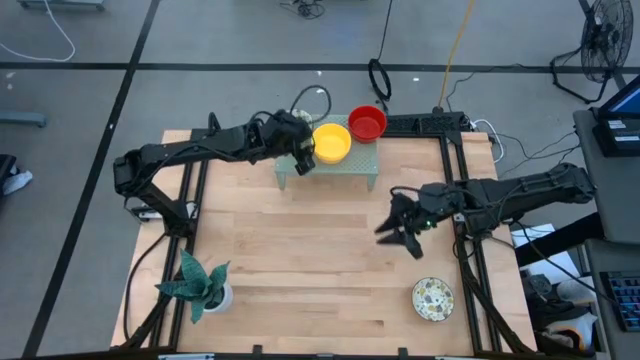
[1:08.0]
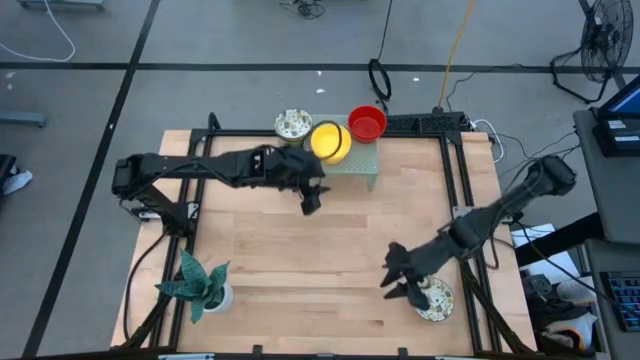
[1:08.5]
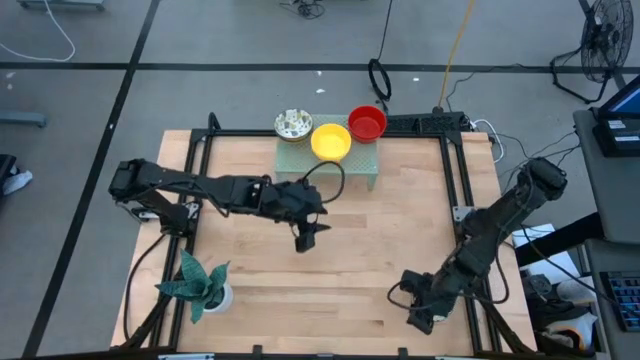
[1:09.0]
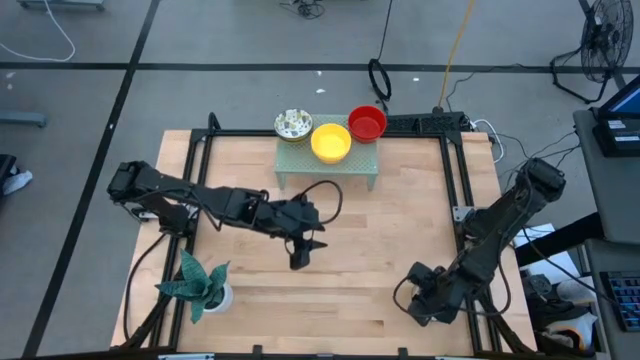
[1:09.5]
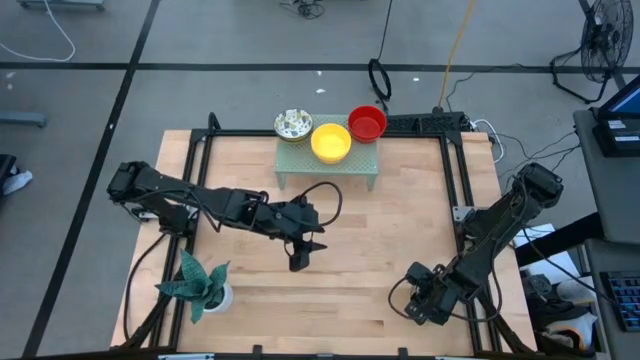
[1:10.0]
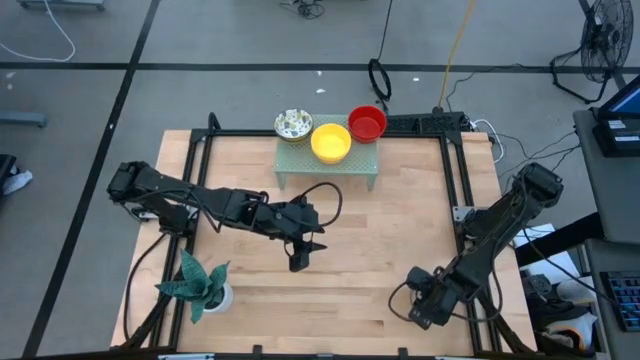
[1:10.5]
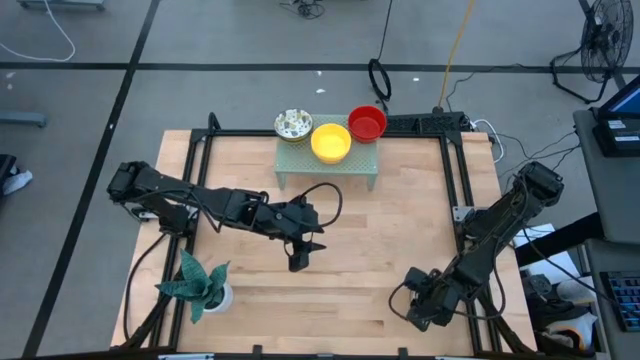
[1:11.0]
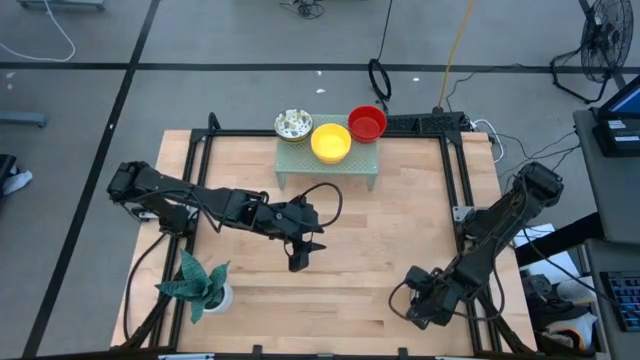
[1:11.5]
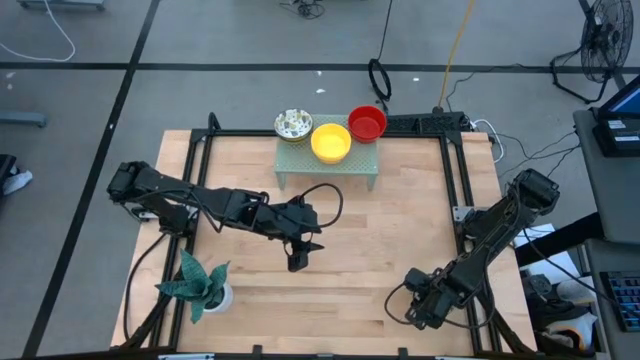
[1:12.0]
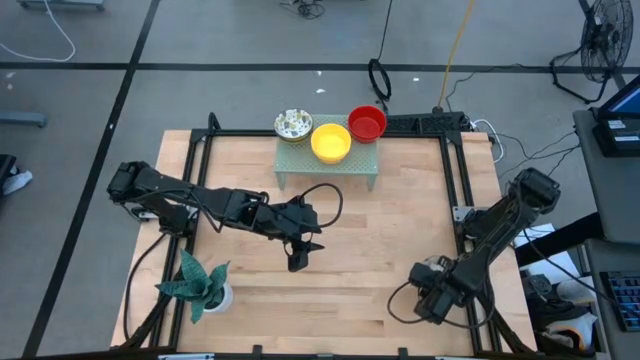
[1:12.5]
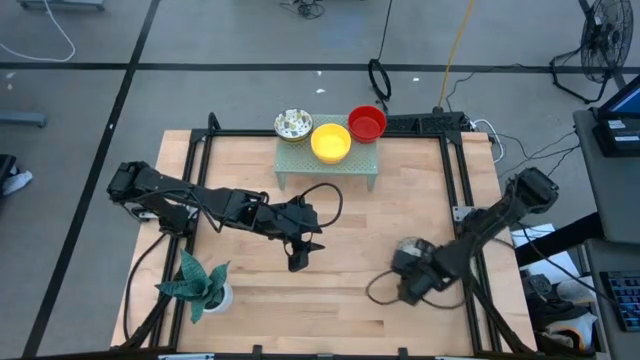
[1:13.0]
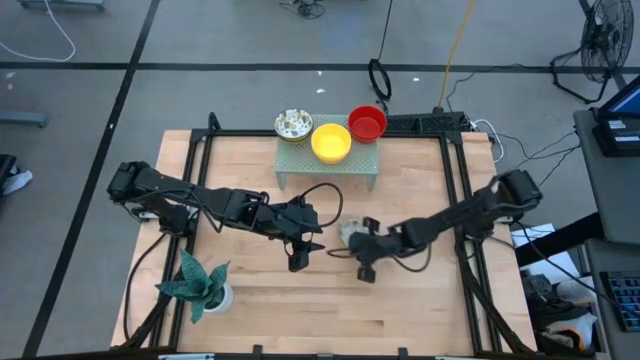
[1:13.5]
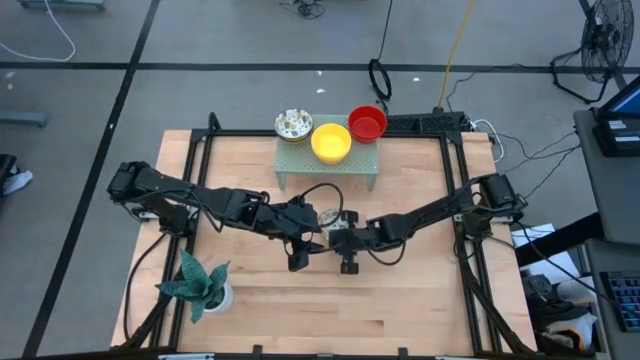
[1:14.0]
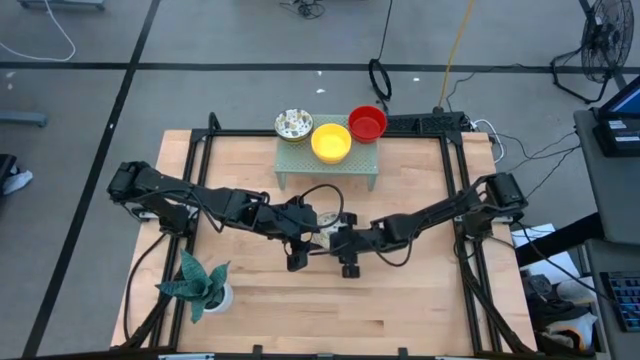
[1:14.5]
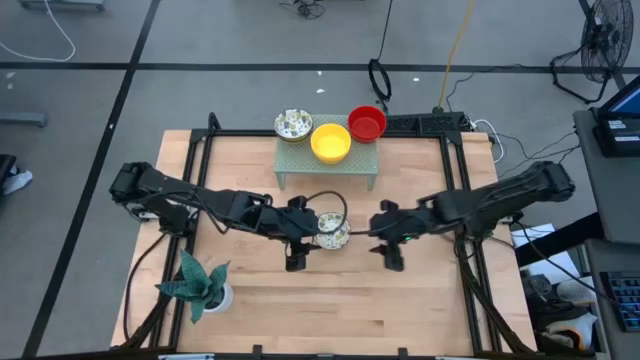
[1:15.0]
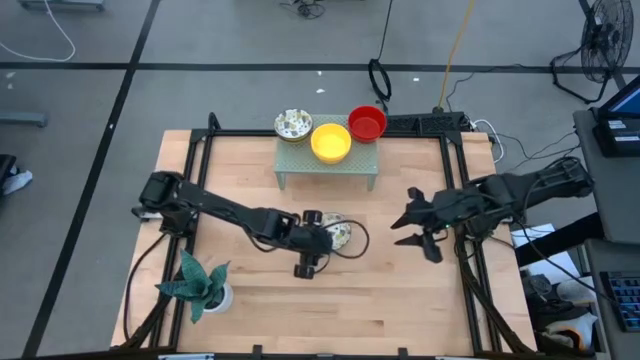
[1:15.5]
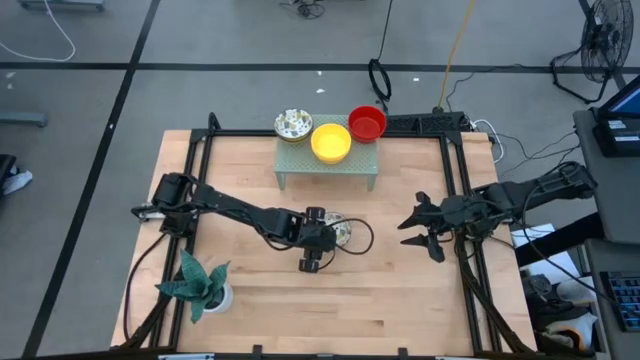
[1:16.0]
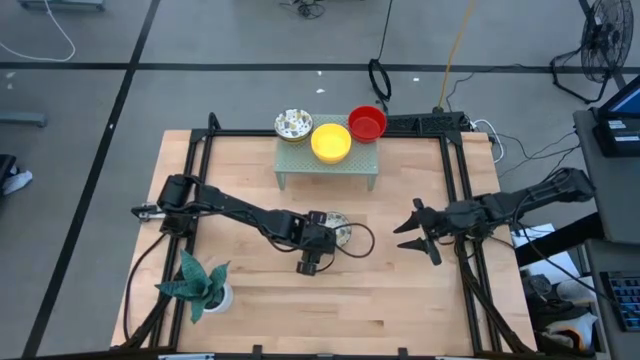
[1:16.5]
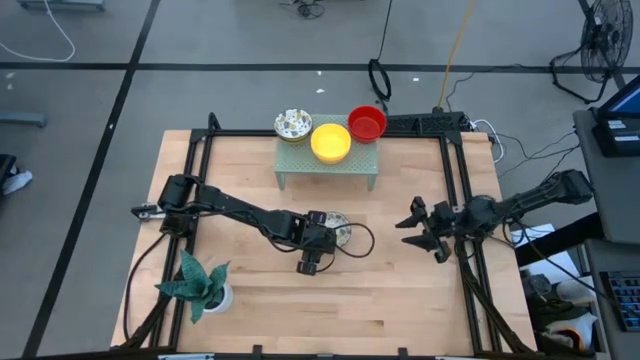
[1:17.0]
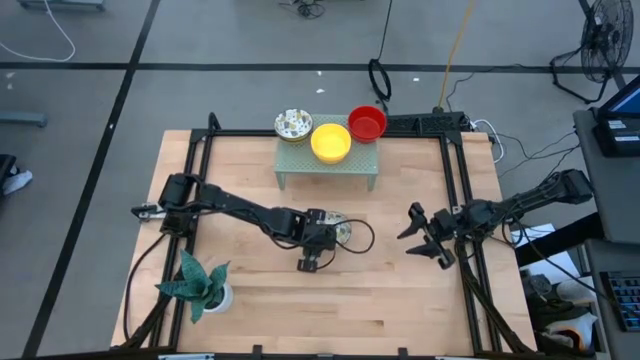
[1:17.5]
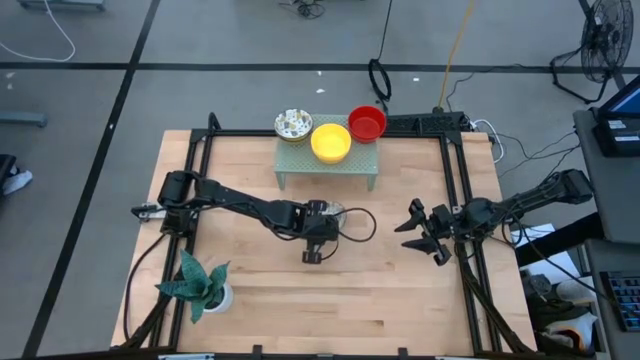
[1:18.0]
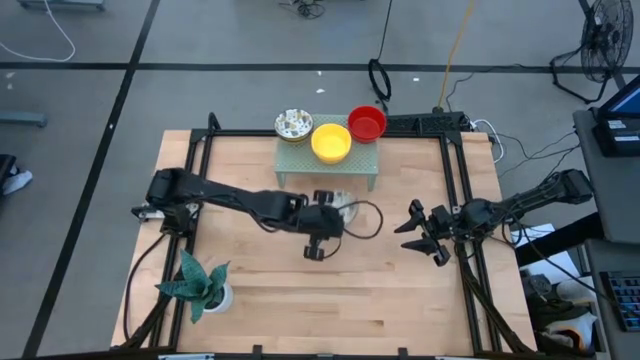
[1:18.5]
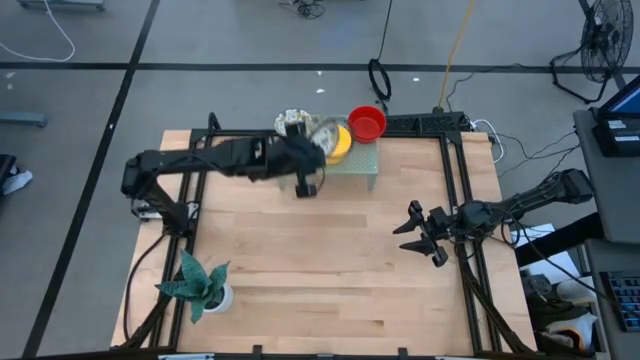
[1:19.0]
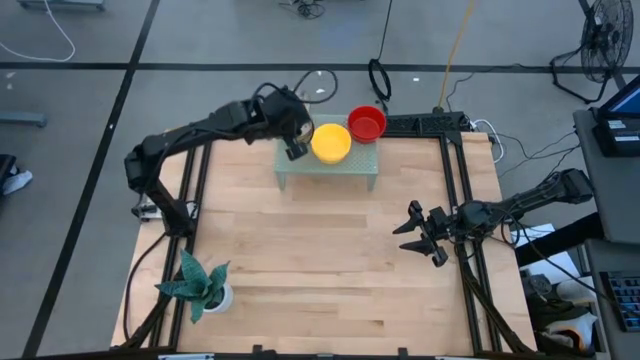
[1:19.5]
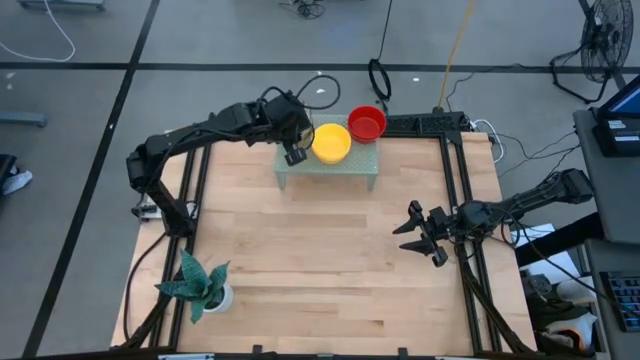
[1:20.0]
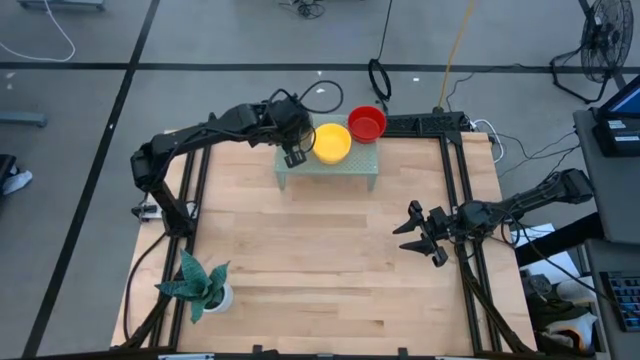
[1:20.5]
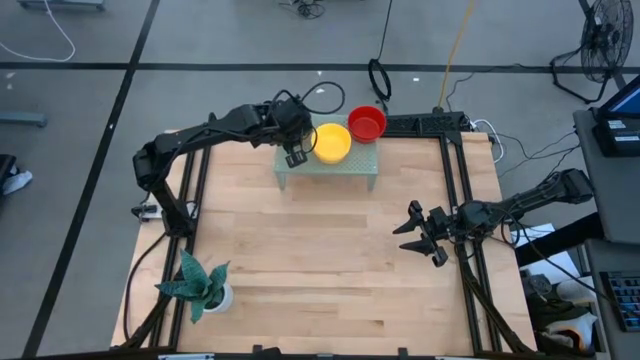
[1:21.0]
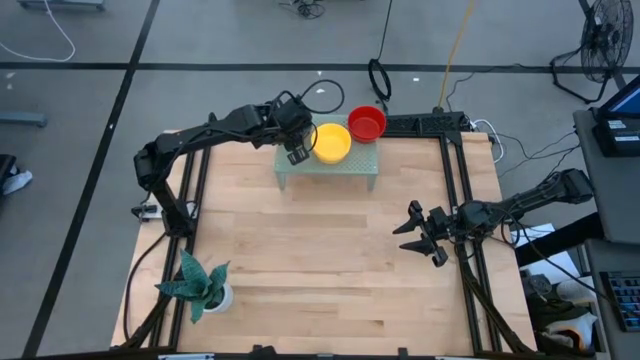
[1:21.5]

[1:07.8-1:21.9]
Task: Pick & Place Mini bowls
Stack the white patterned bowl on top of the other white patterned bowl on the shelf

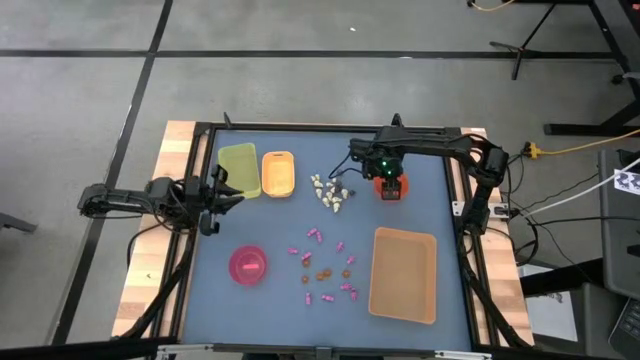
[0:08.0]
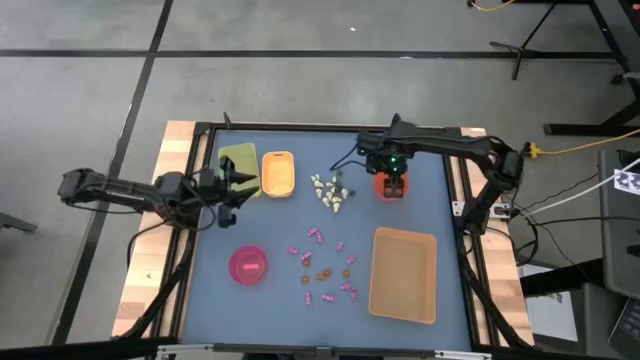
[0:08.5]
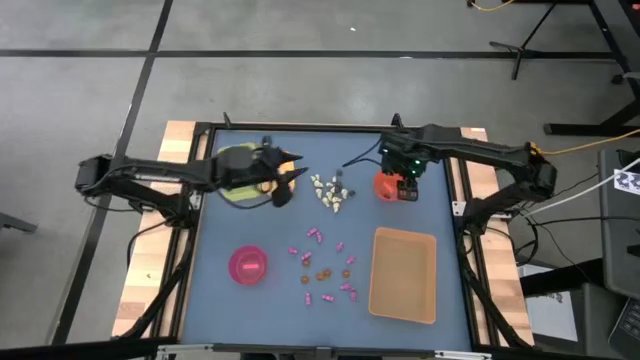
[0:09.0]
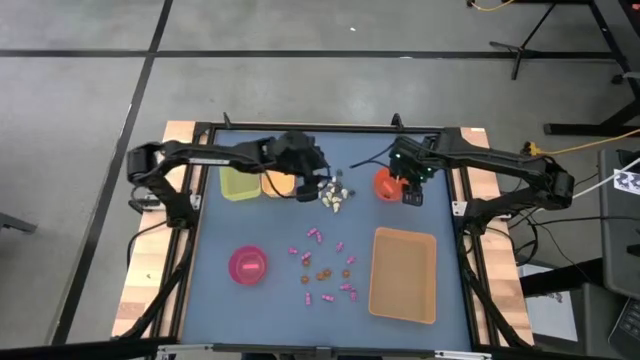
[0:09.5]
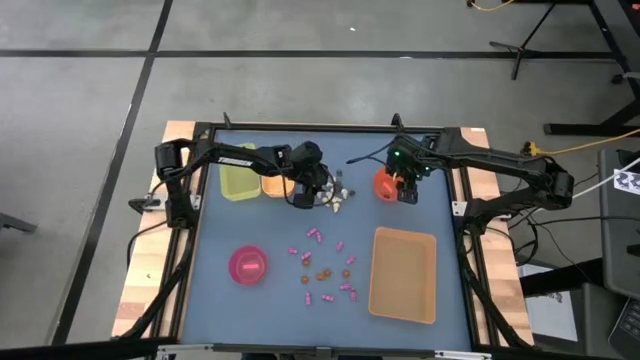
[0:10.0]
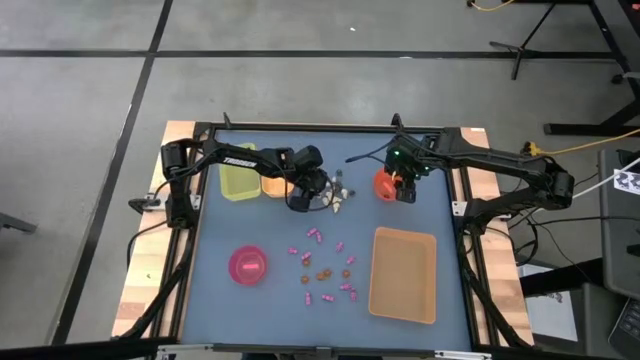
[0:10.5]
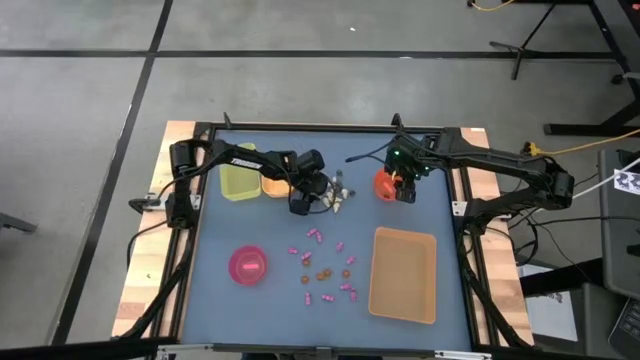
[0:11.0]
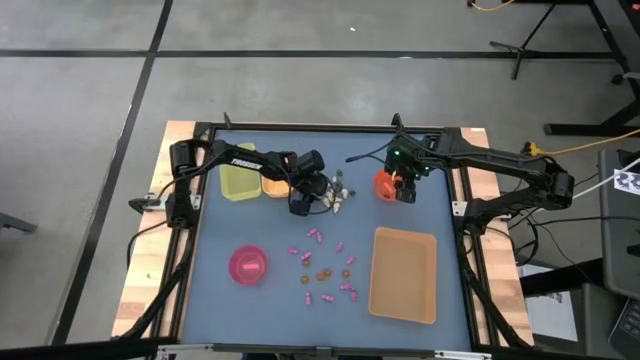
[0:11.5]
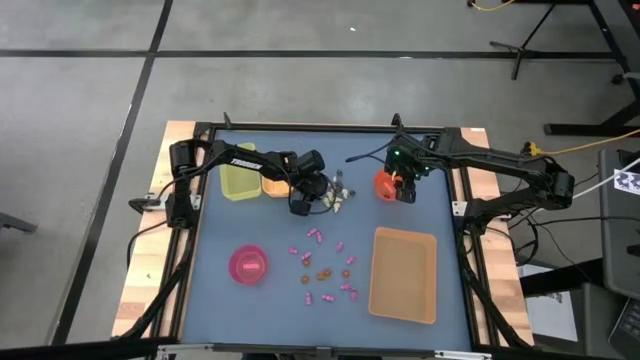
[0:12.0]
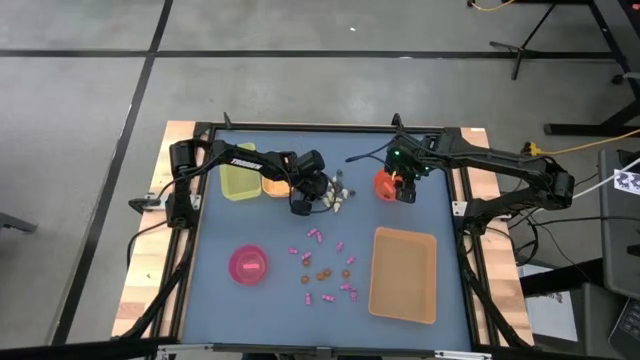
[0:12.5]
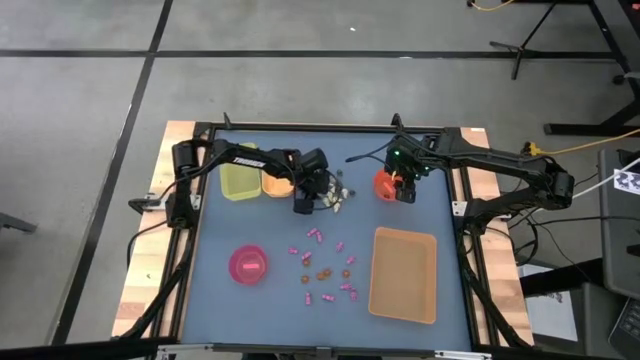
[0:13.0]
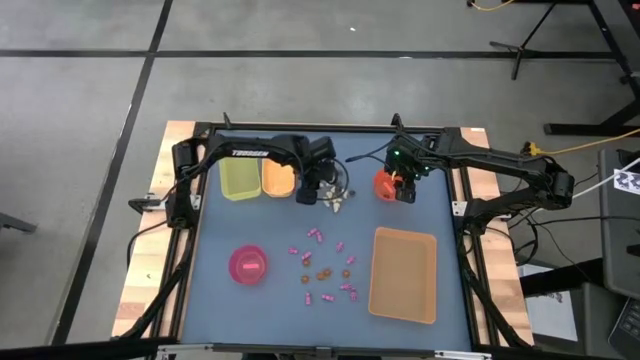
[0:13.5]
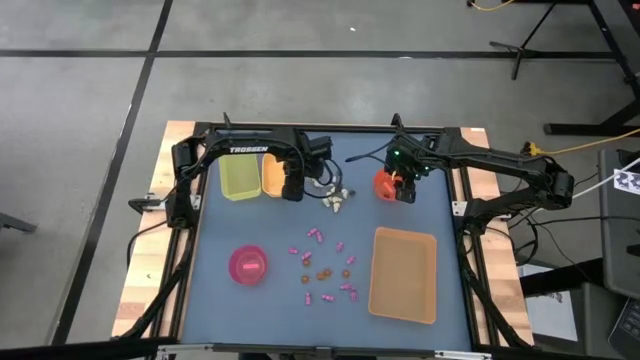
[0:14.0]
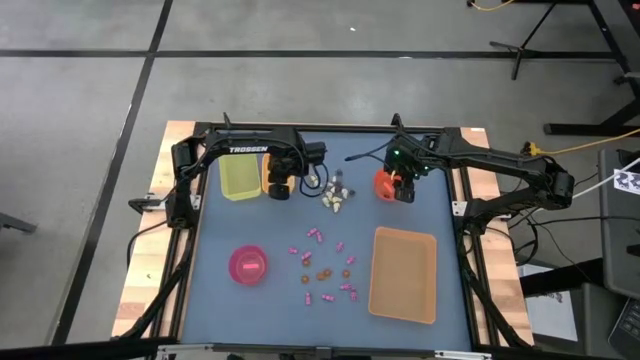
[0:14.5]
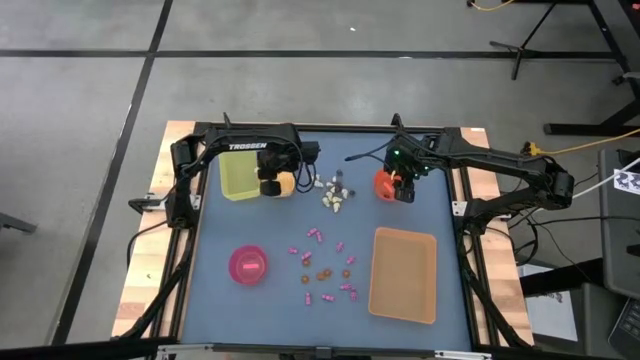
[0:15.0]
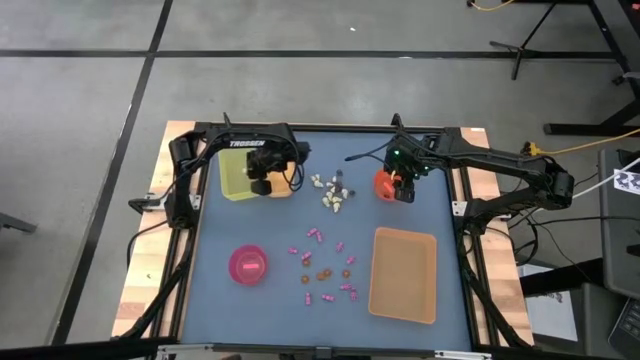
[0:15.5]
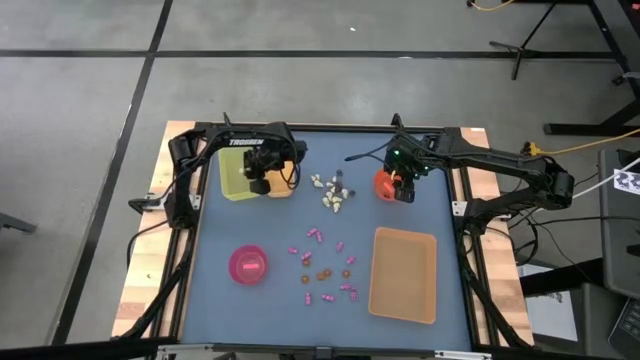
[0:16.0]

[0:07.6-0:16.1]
Task: Sort Halloween decoration
Put the white skull toy into the yellow bin
